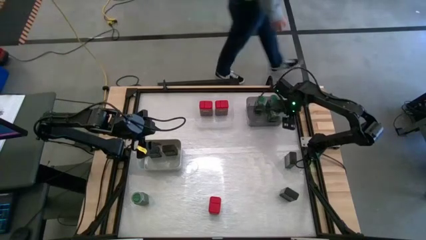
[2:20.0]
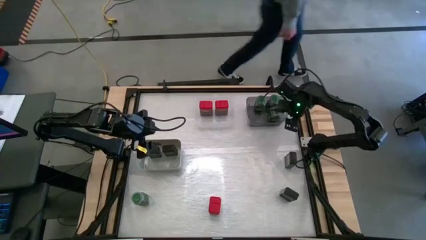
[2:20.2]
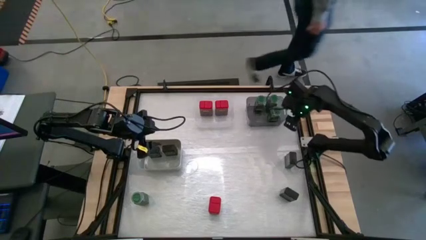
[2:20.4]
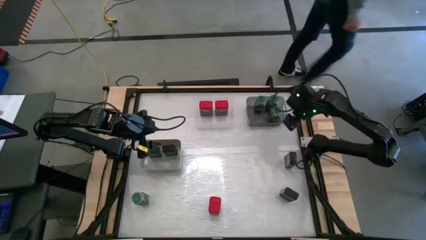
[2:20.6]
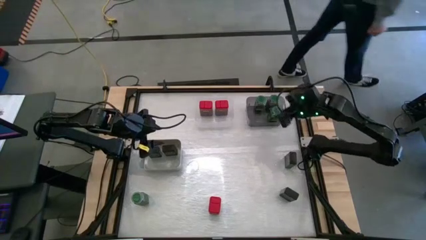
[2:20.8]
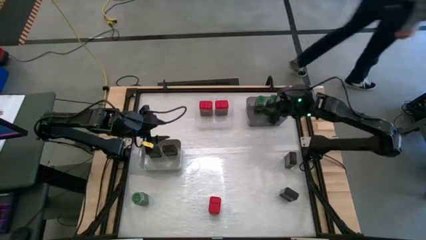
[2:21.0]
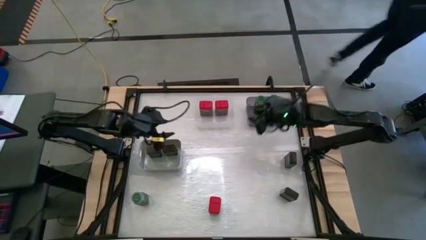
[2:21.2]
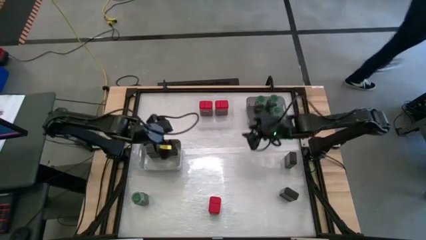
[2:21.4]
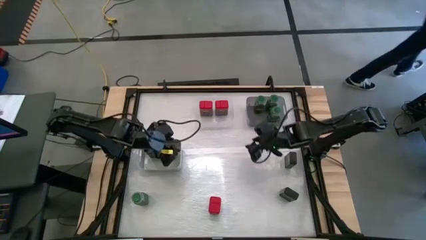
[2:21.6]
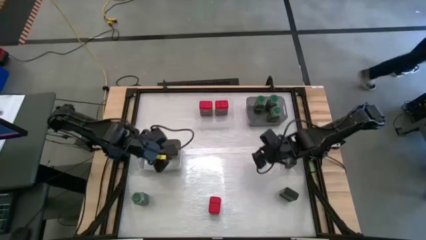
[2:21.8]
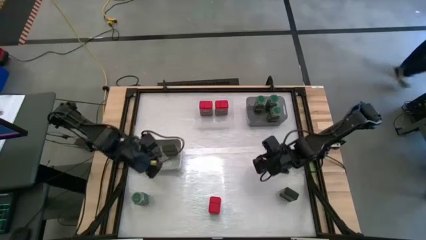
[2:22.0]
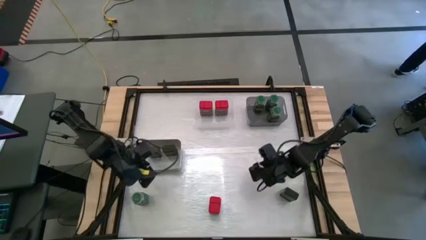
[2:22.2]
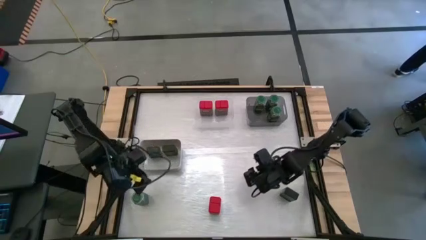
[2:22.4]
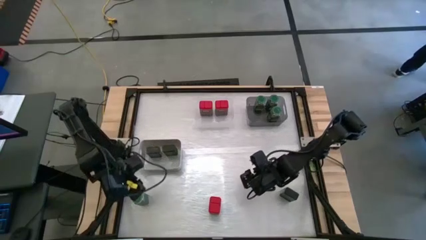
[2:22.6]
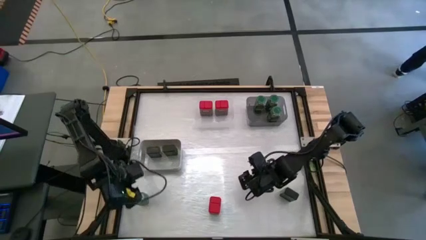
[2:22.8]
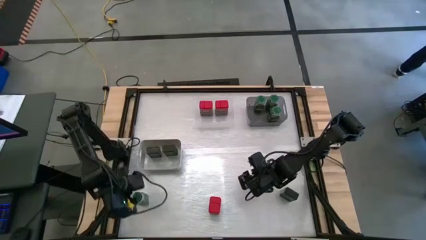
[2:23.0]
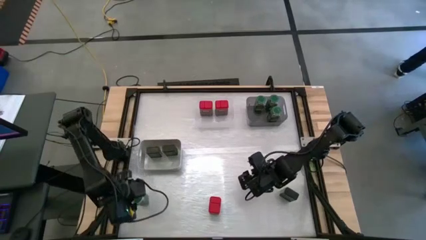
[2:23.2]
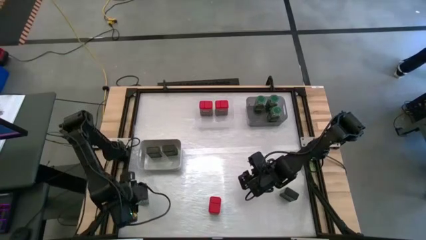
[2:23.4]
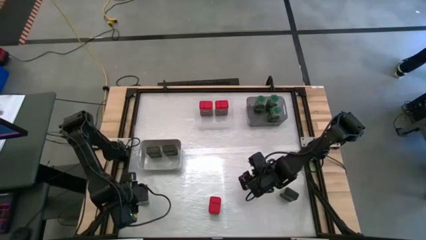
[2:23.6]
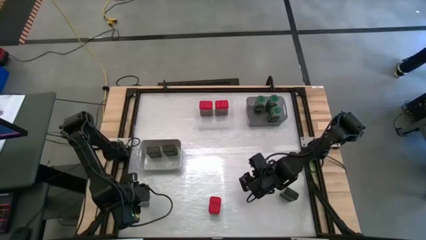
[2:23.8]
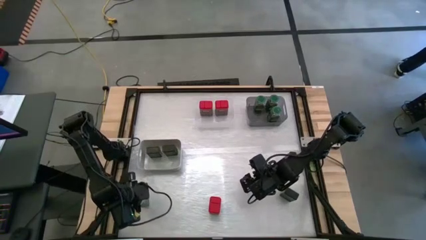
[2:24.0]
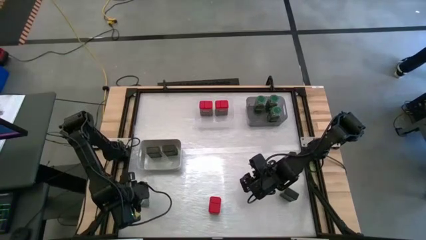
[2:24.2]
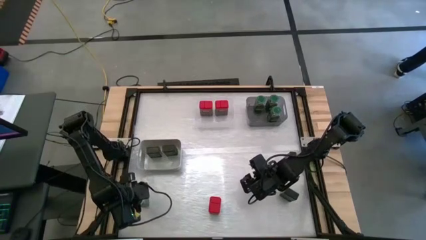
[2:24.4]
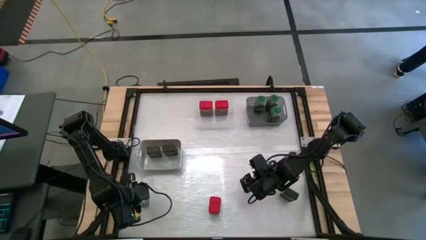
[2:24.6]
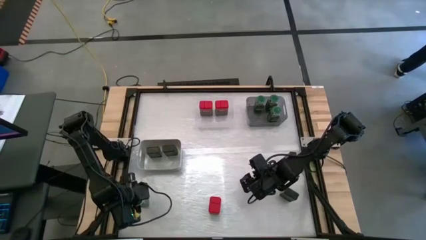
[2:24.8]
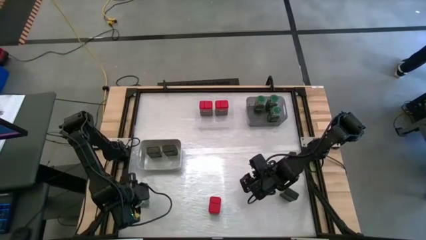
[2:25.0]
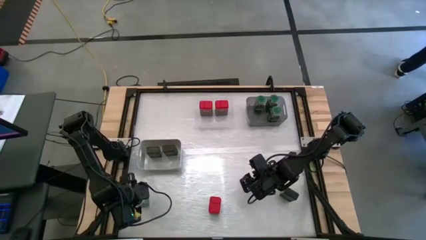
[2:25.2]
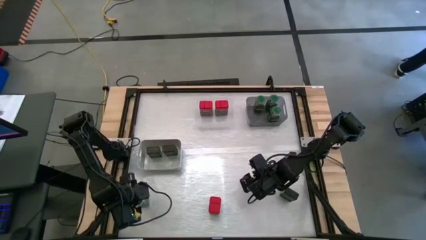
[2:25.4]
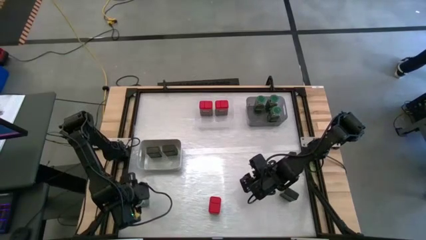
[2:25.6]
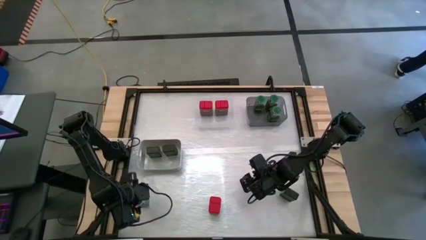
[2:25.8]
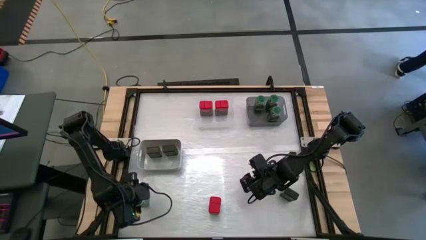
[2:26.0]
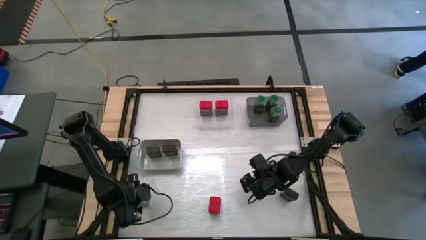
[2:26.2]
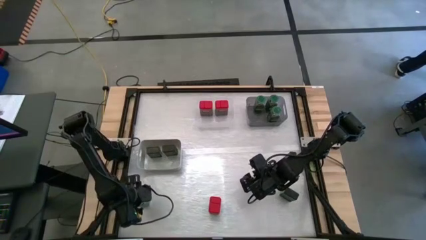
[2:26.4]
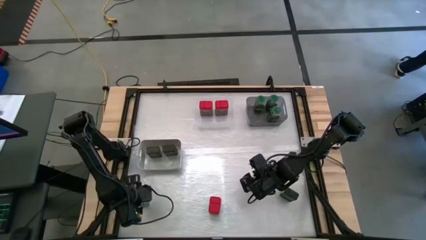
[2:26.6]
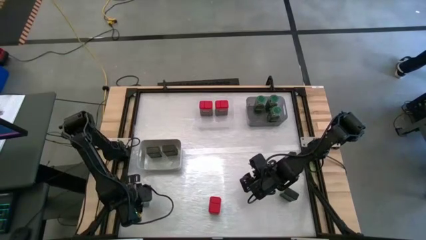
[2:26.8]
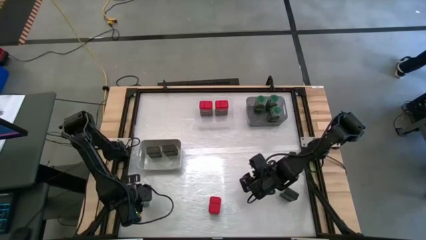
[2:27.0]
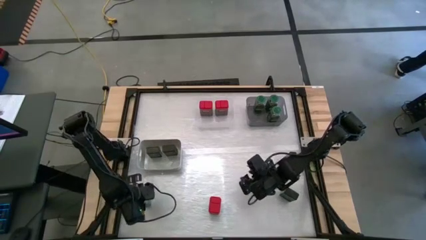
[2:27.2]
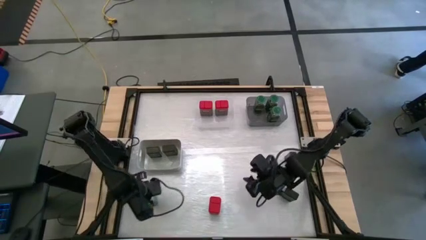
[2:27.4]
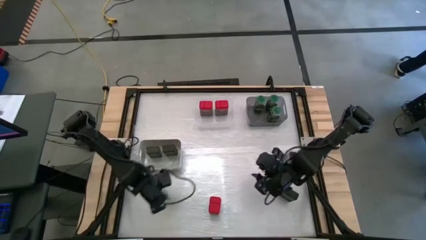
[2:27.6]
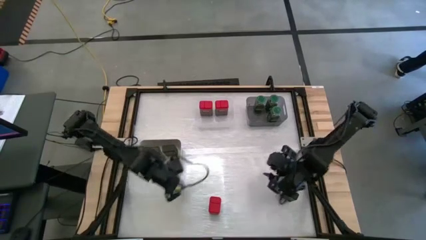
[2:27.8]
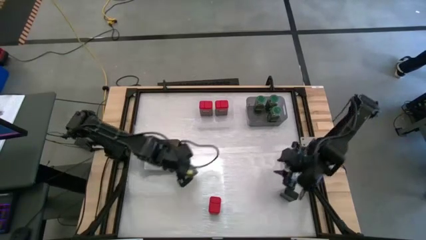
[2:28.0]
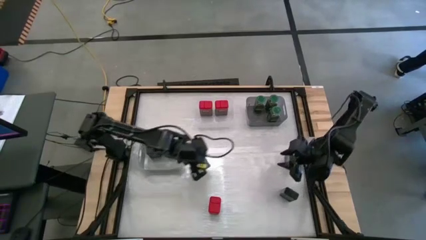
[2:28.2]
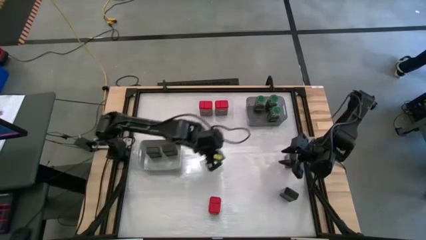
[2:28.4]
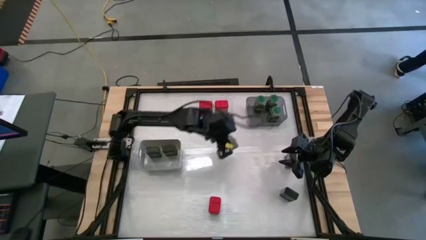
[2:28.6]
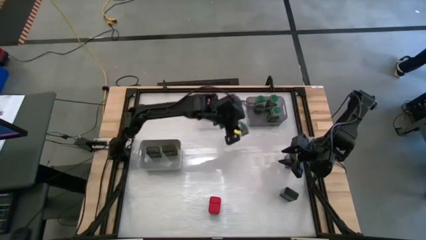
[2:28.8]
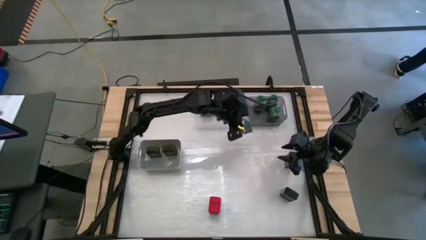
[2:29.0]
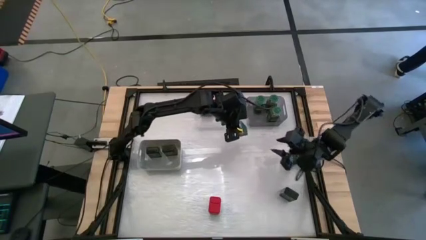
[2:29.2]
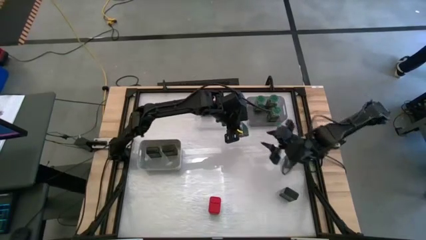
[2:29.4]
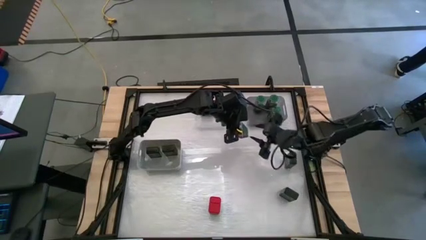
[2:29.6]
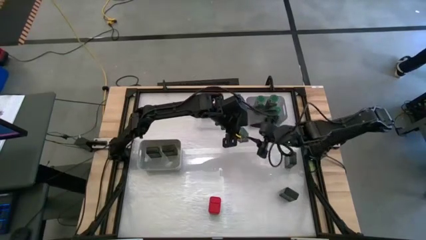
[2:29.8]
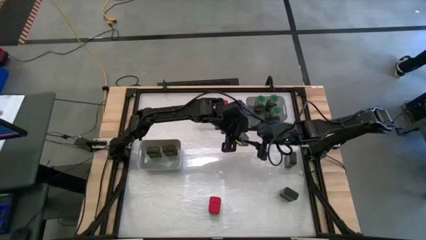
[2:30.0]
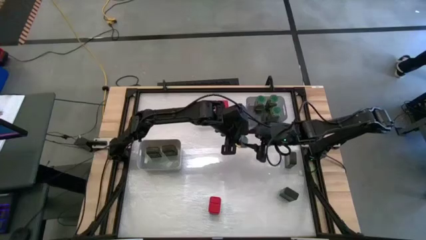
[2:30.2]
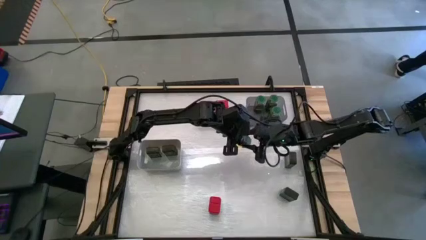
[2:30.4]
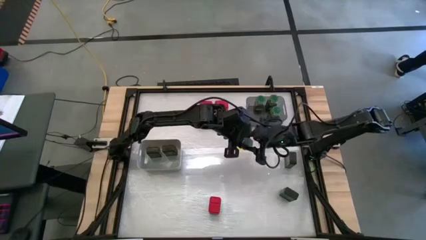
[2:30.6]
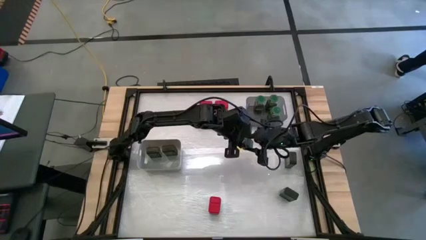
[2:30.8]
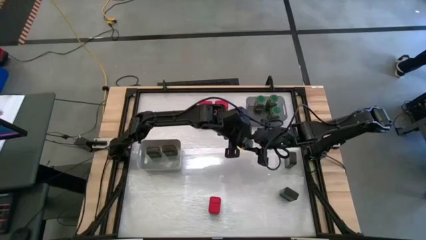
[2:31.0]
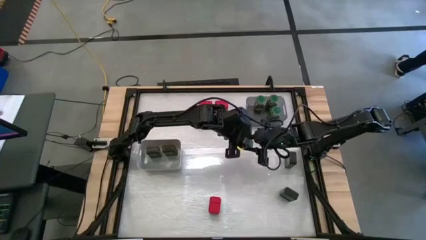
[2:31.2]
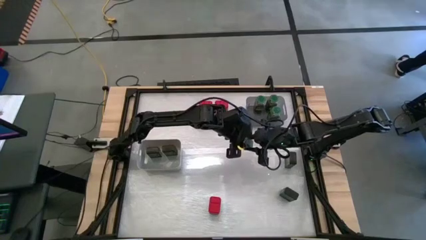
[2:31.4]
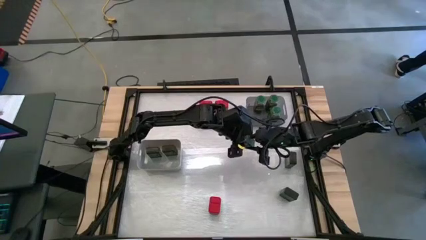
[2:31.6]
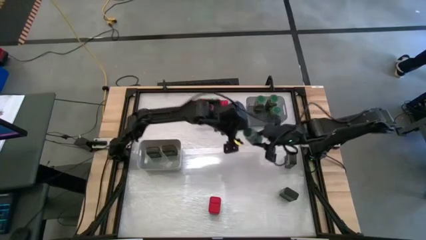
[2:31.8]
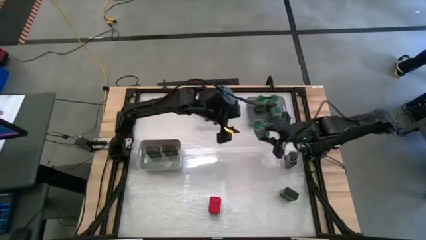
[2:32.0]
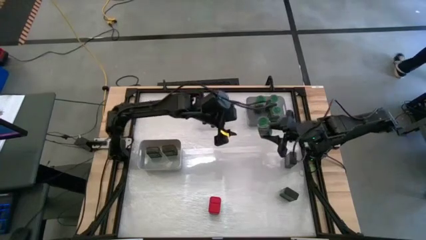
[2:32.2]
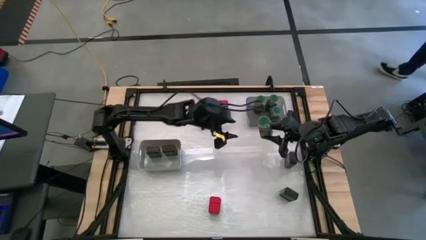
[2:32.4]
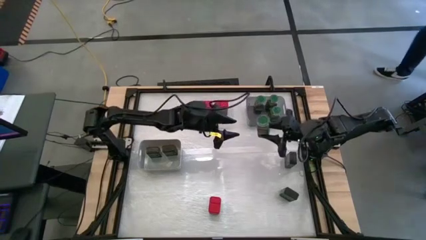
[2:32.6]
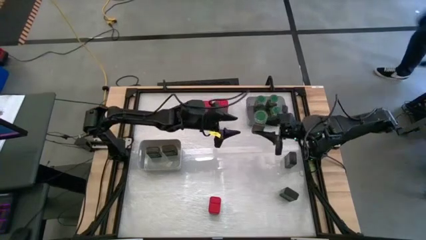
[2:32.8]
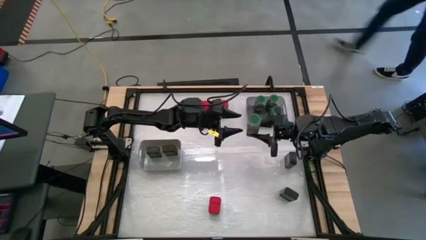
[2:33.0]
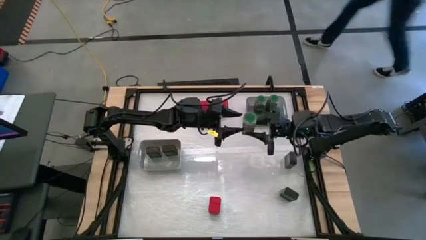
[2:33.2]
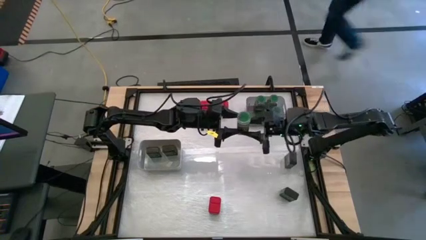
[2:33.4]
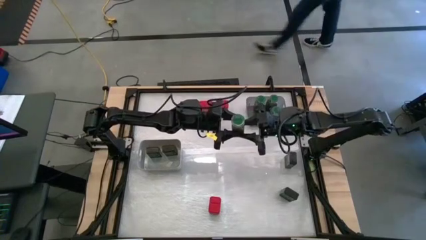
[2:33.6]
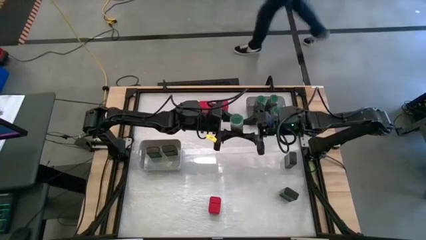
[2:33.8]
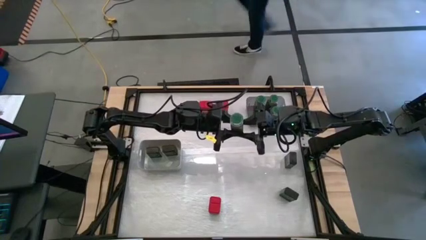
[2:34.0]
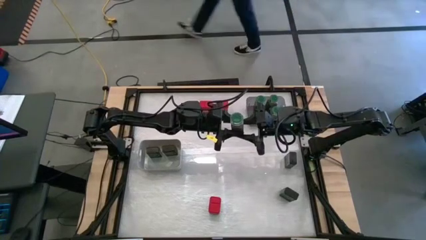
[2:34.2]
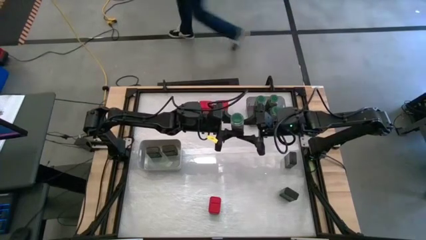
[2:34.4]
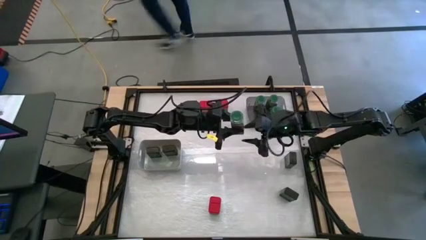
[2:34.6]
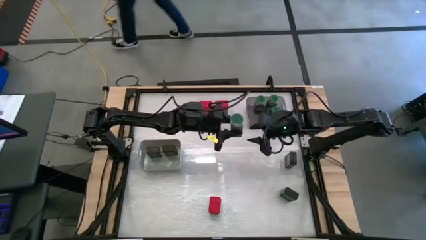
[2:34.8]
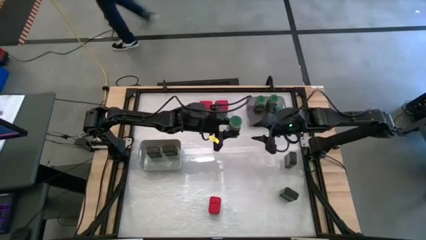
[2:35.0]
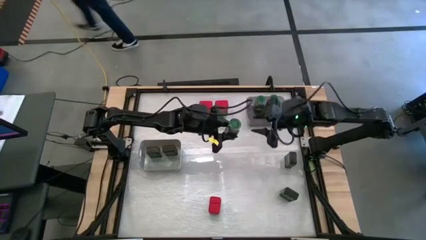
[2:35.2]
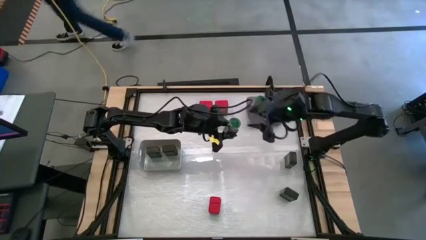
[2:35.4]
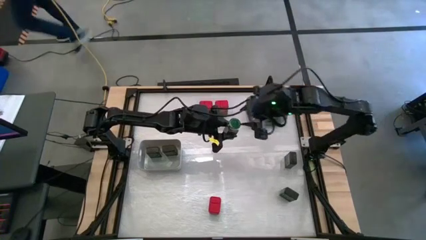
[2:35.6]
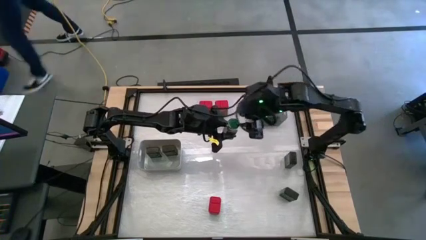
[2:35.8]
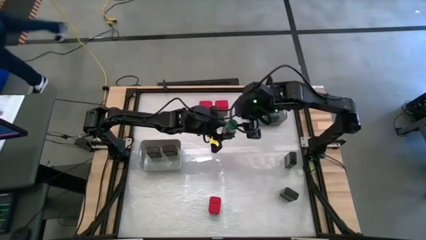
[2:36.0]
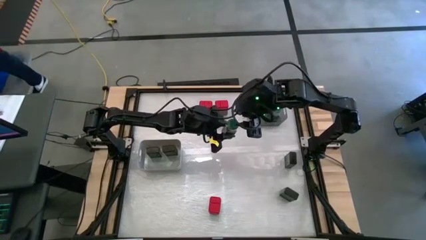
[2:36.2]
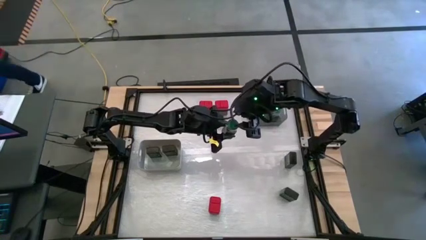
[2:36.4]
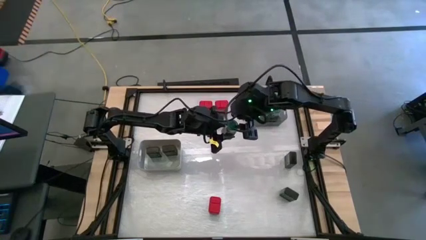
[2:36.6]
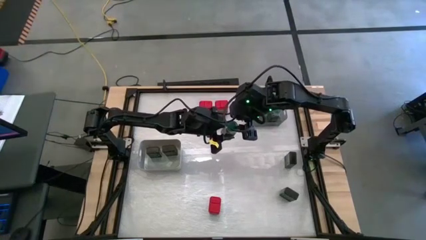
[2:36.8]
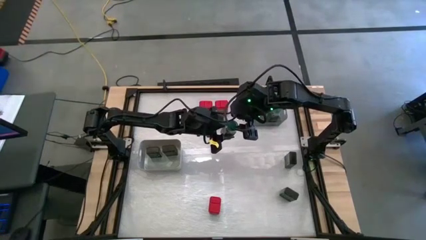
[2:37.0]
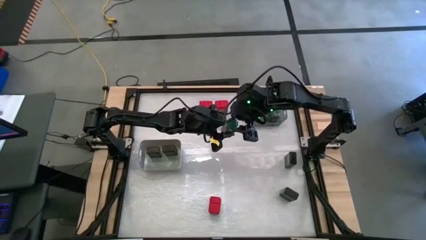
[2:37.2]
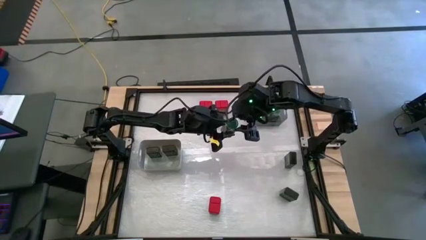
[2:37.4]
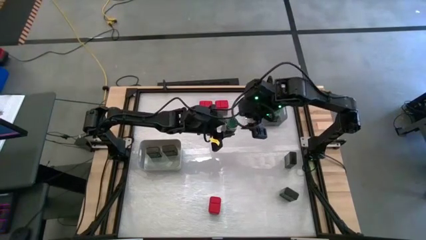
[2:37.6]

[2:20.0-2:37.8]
Task: Sort spices by type
Put the green seasoning bottle into the black bin
